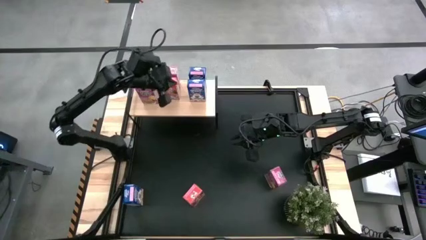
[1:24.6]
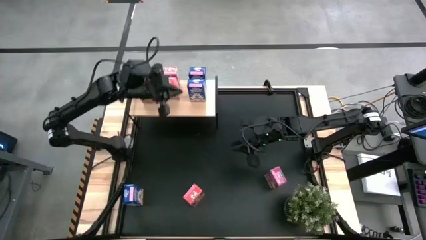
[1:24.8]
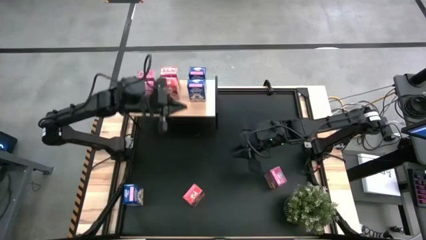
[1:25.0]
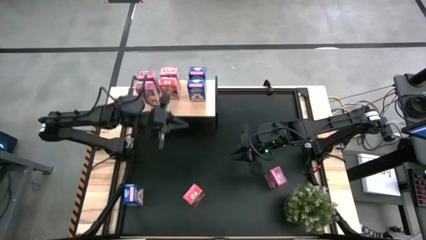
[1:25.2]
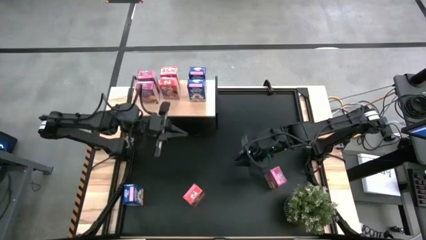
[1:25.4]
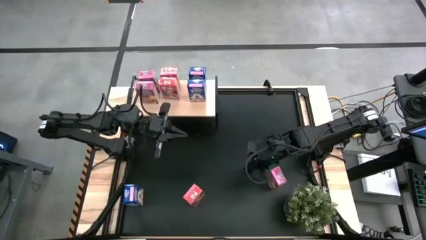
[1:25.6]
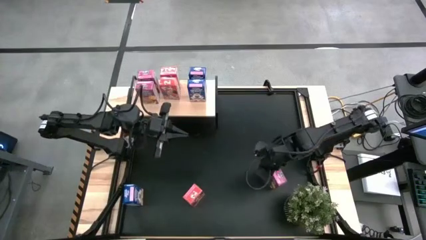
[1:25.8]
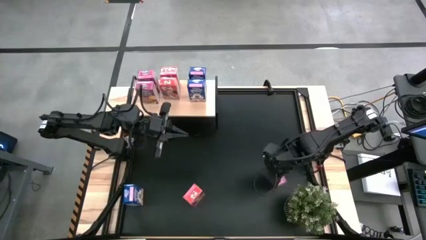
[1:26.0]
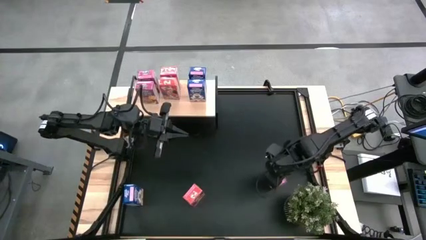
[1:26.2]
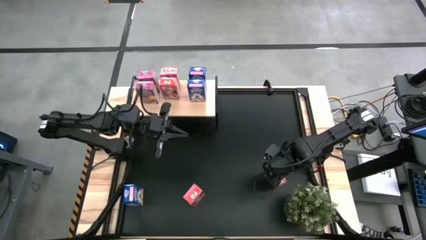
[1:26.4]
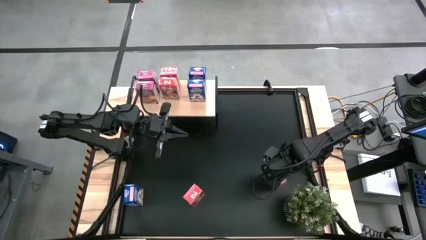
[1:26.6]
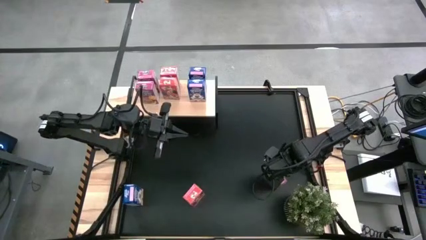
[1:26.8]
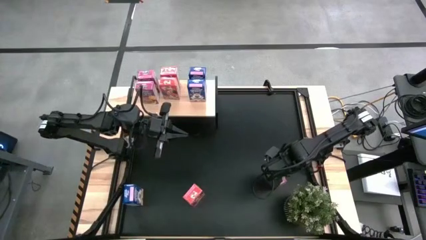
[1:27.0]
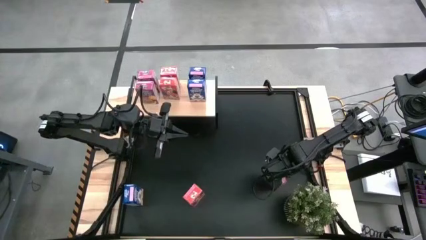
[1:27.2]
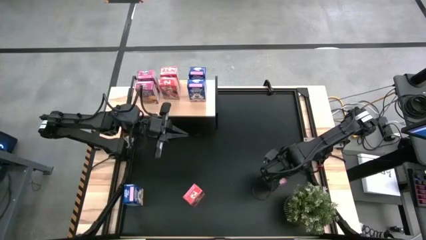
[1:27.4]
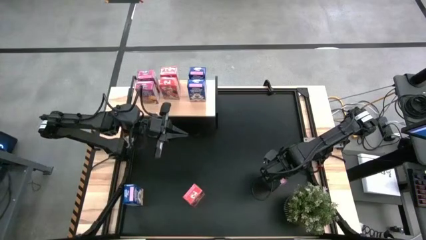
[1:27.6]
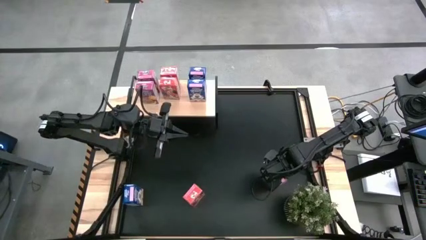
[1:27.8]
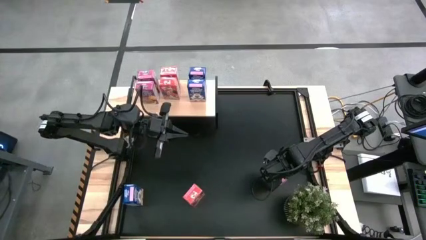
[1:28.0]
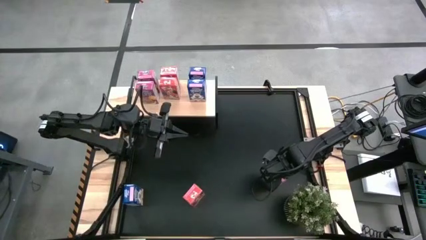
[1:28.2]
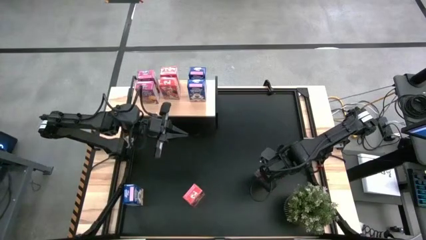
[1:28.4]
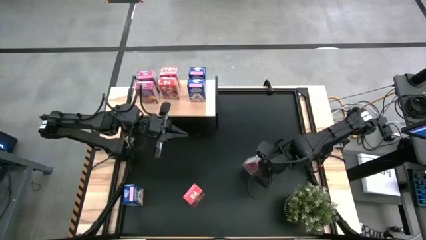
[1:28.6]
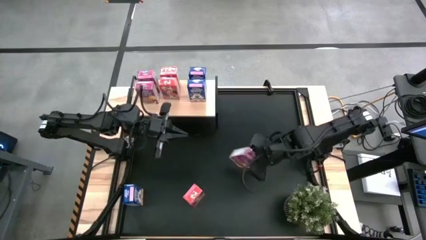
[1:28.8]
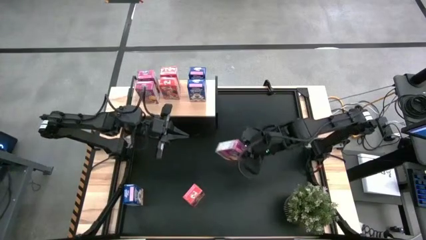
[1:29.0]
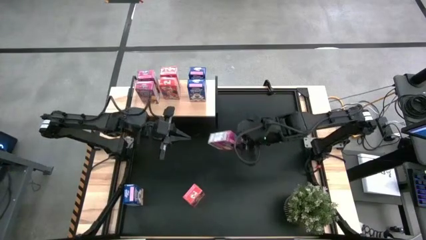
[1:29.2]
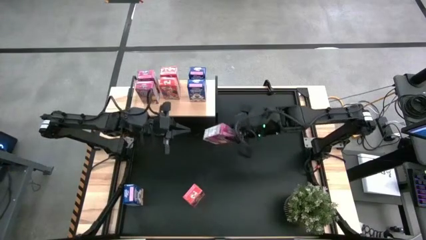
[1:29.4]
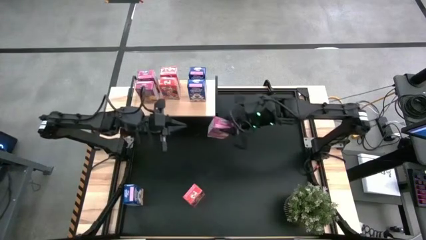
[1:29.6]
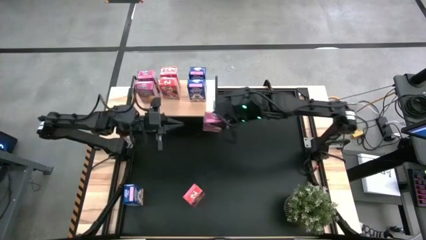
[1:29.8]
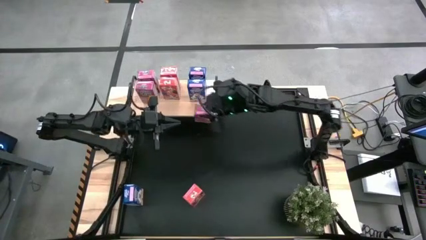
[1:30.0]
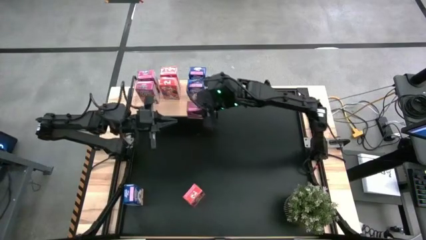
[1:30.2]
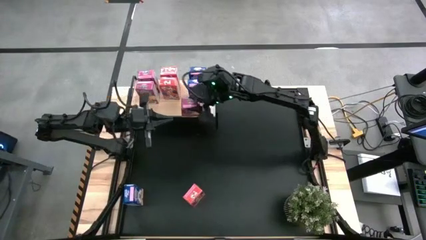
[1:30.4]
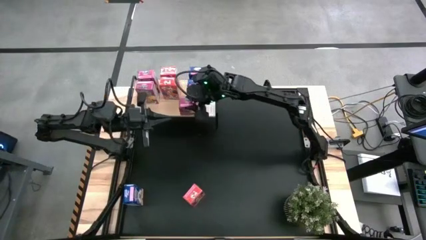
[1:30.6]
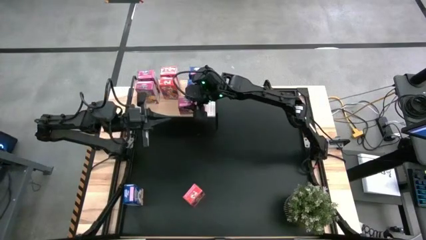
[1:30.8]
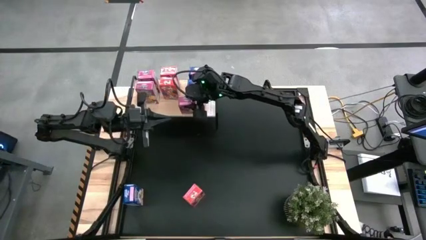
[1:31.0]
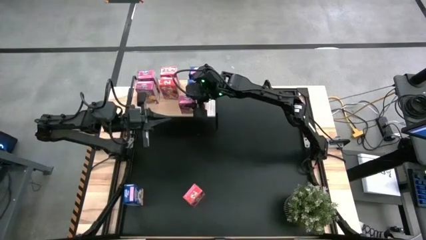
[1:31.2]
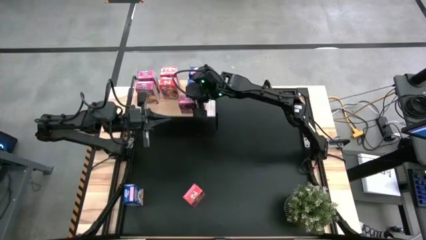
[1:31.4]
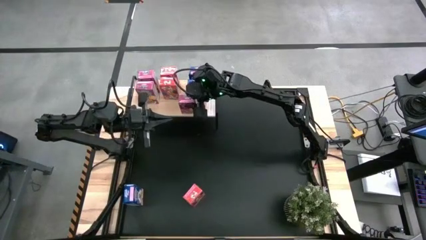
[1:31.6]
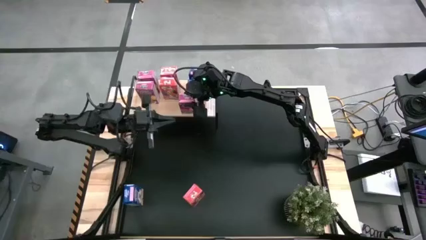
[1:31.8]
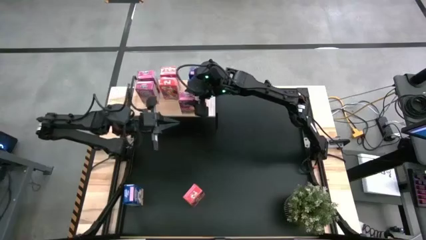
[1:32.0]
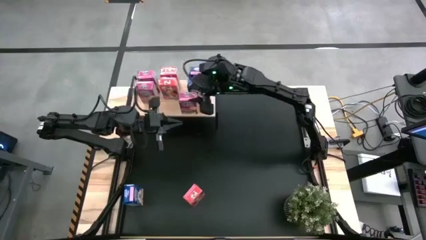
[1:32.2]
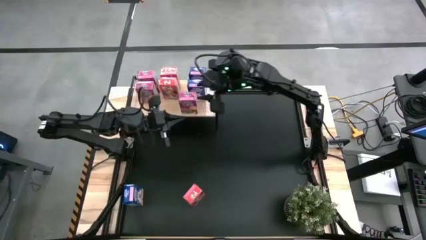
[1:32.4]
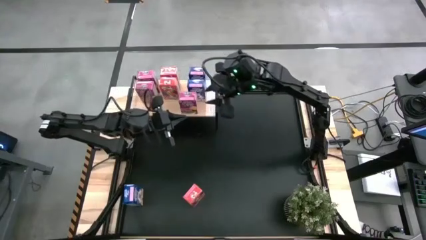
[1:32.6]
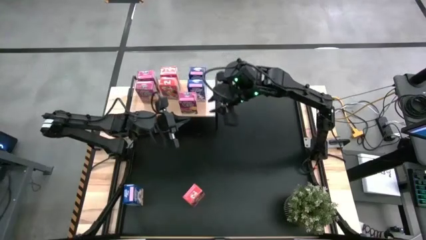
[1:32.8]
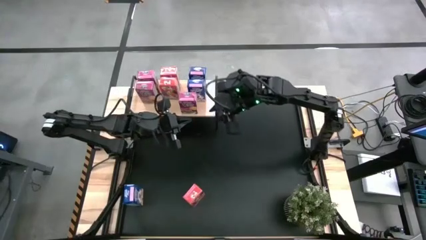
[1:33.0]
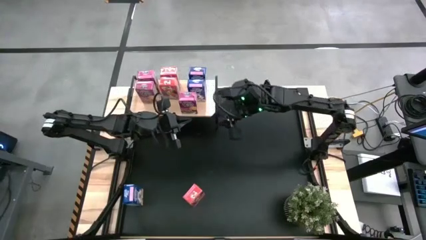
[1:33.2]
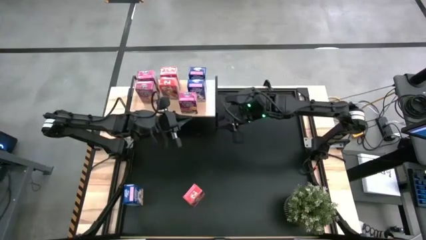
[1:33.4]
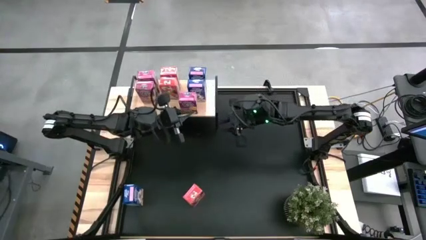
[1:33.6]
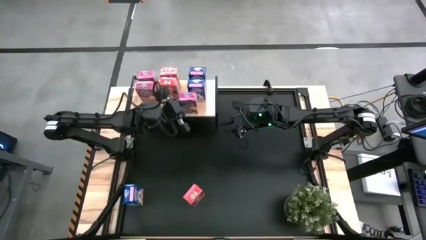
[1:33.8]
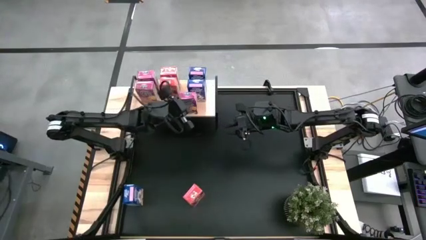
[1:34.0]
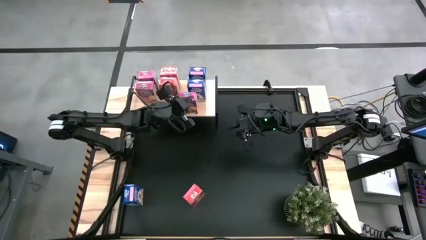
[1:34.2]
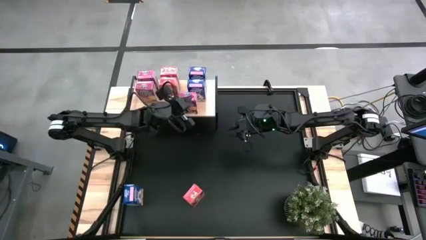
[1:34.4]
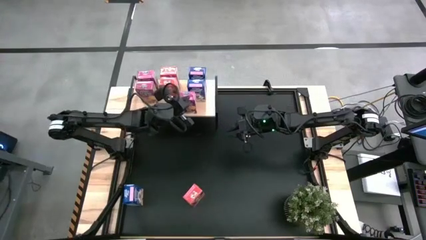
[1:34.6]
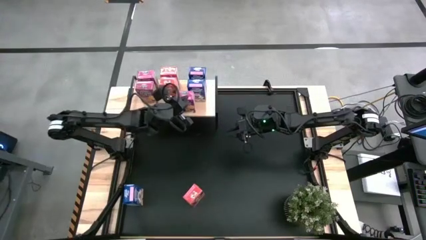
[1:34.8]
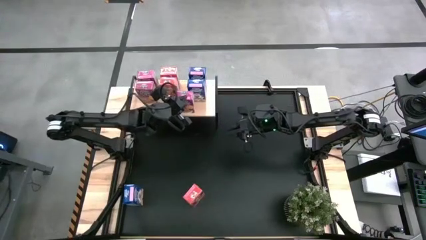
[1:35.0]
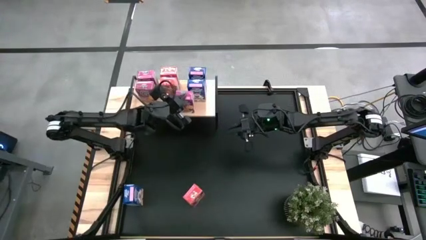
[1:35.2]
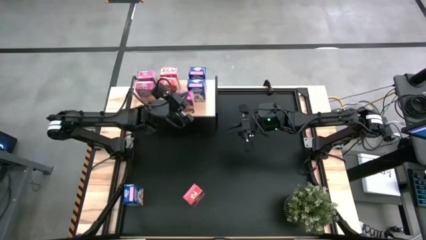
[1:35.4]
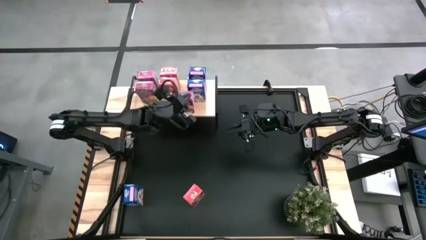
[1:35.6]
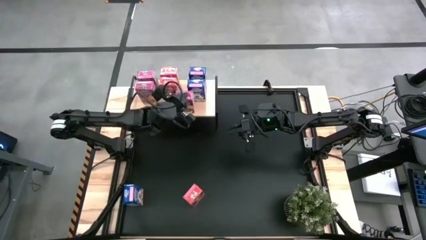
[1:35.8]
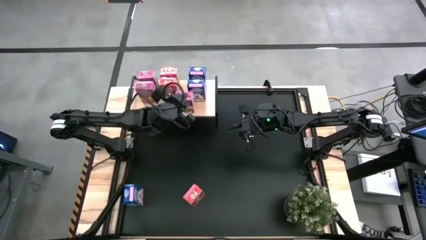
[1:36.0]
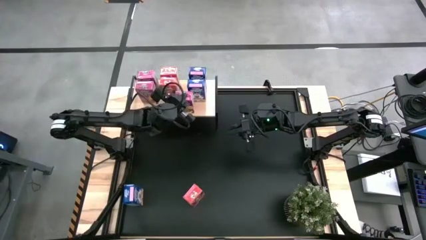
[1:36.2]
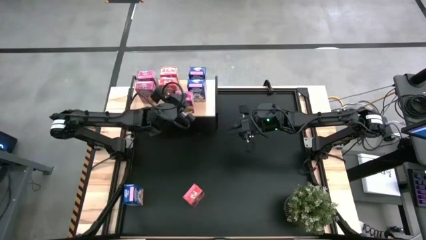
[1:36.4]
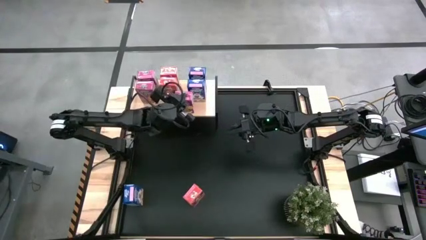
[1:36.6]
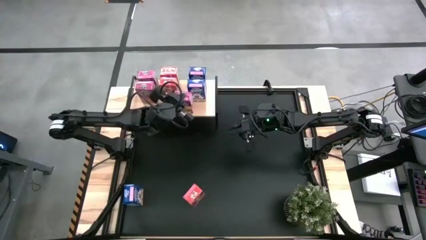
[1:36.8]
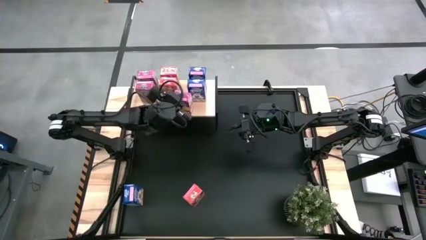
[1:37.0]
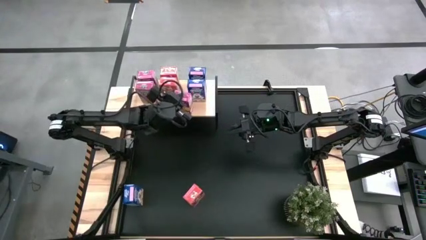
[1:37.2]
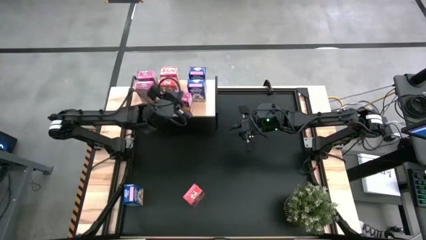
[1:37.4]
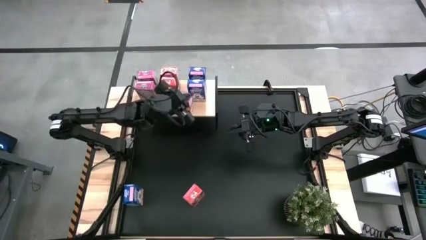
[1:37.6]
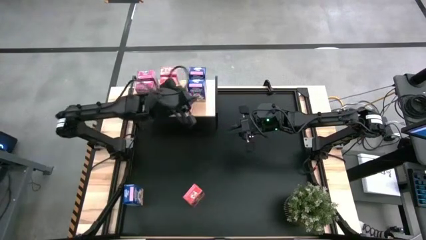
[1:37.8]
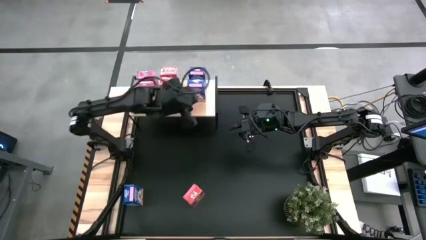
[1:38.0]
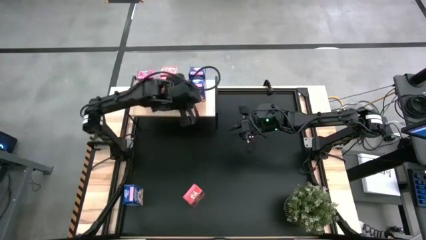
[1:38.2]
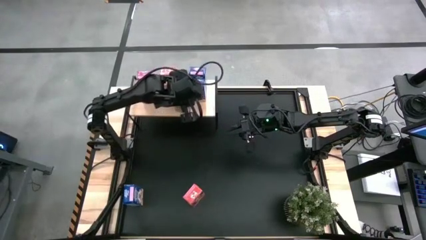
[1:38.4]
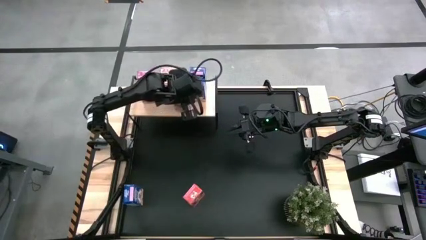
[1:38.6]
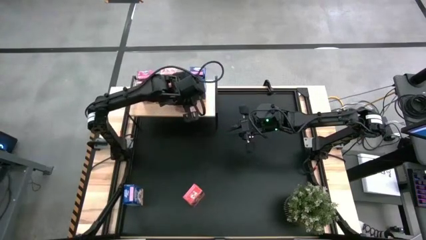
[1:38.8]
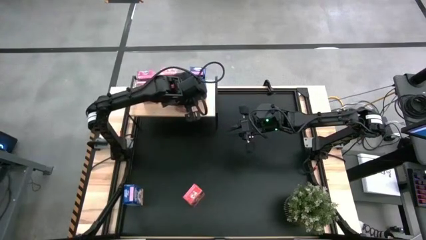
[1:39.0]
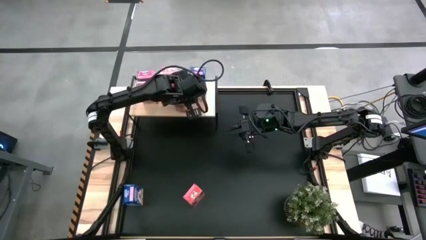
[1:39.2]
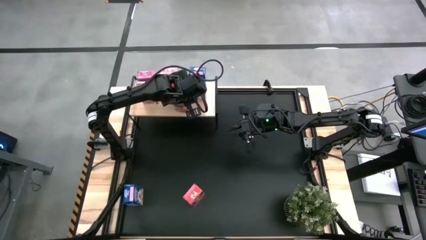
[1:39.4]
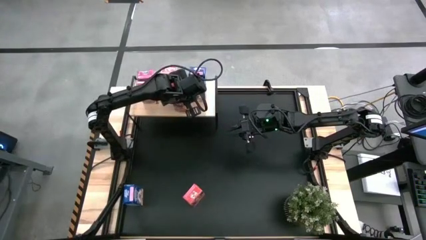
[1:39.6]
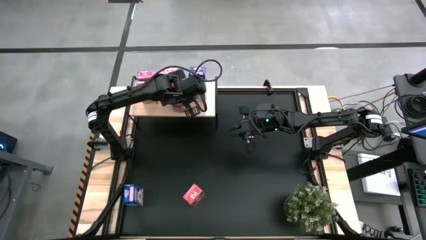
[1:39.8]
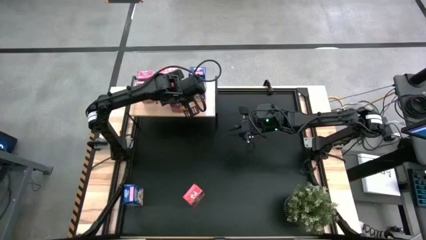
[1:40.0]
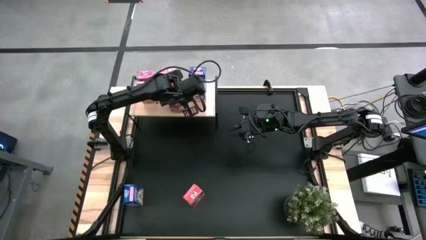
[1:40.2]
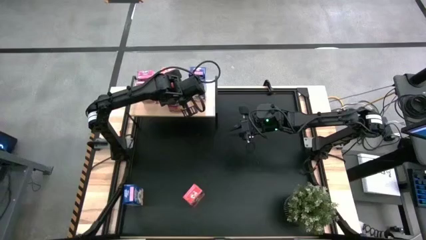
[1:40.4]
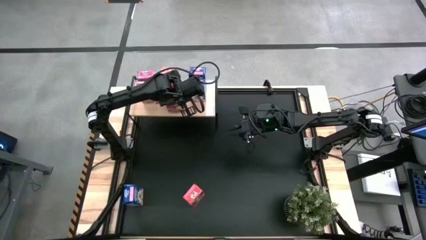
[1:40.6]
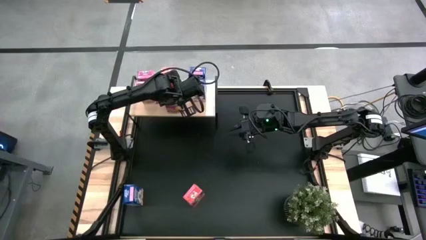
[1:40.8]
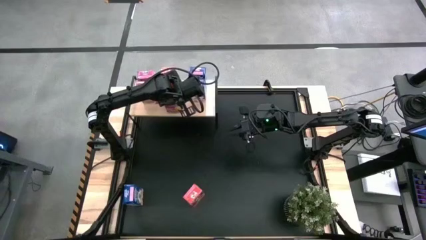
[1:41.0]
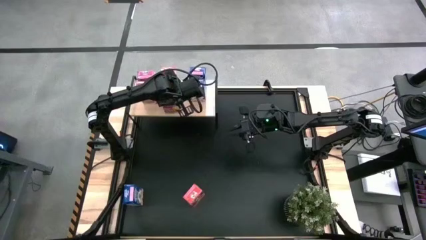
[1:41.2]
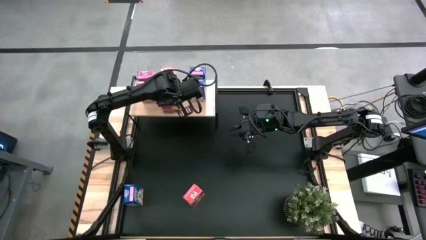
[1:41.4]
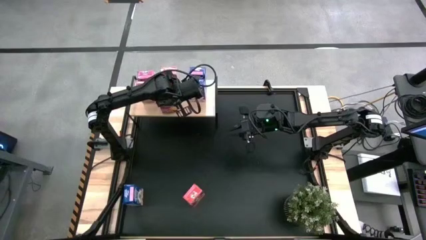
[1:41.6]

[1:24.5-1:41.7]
Task: Stack cereal on shelf
Align the purple cereal box with the other purple cereal box on the shelf
